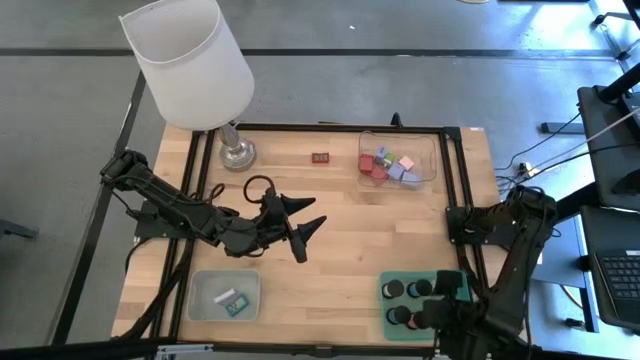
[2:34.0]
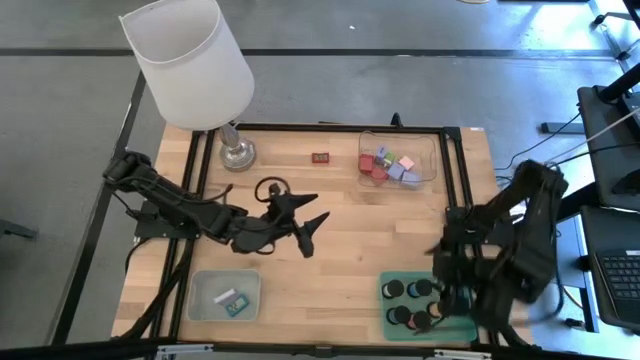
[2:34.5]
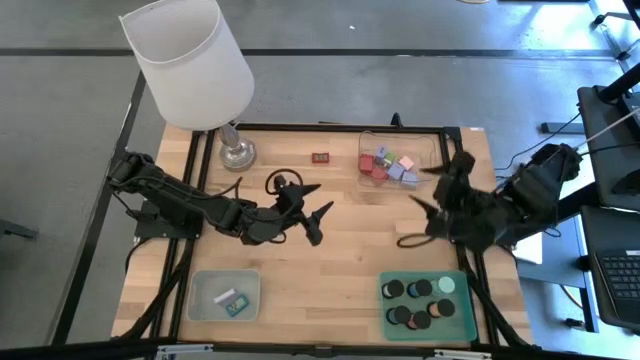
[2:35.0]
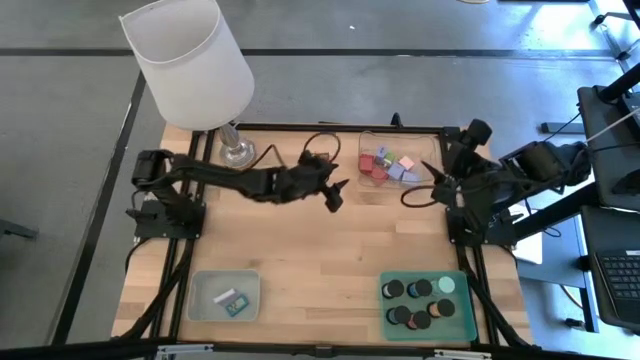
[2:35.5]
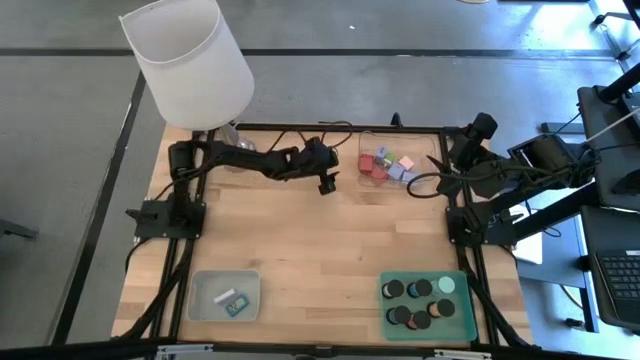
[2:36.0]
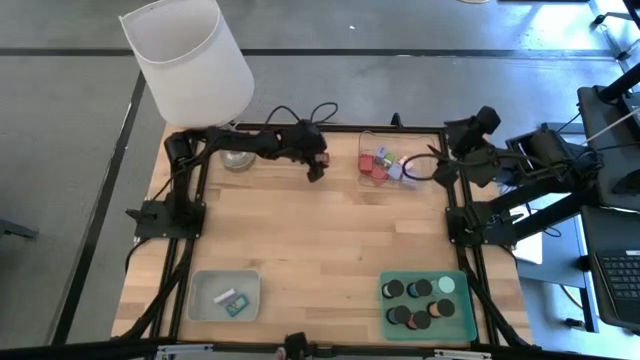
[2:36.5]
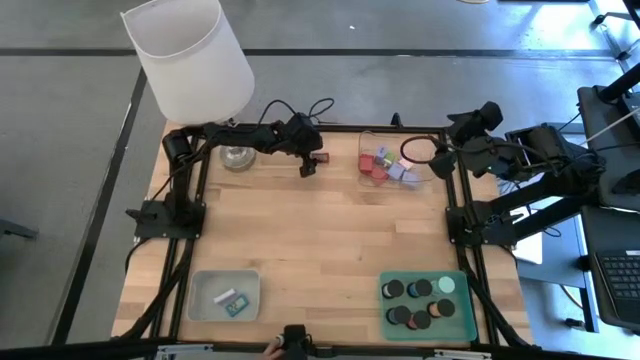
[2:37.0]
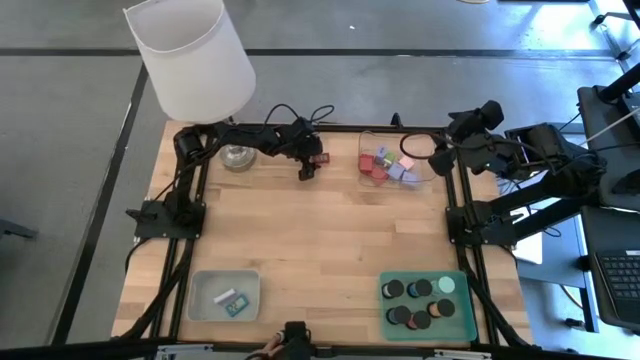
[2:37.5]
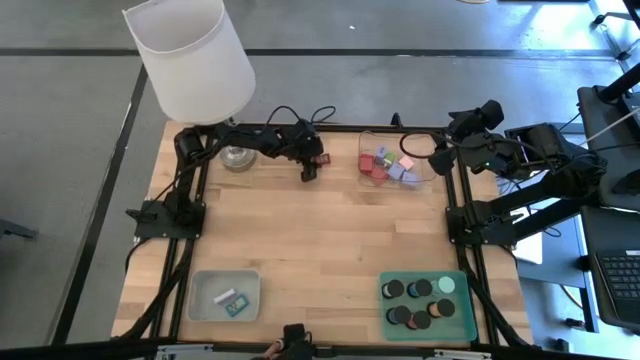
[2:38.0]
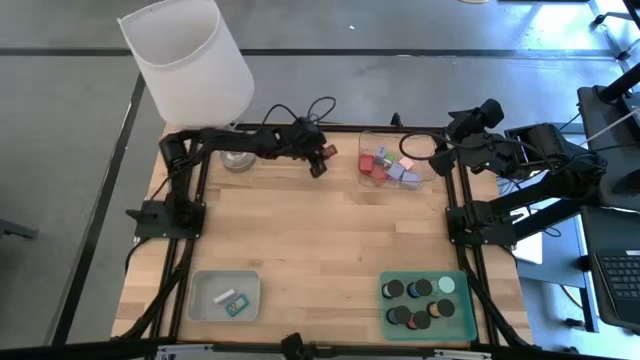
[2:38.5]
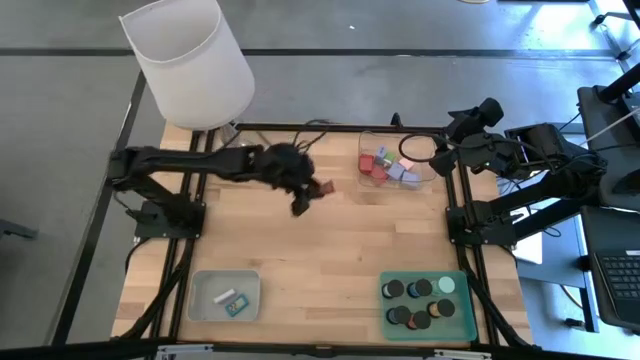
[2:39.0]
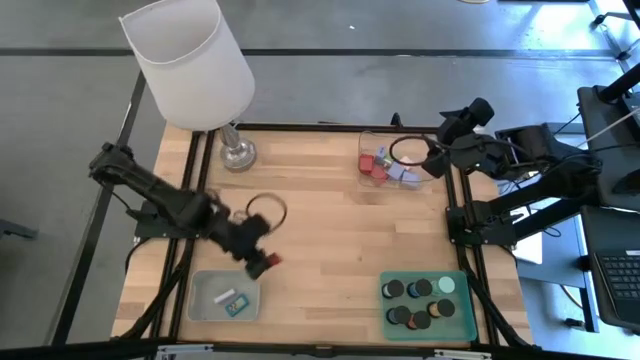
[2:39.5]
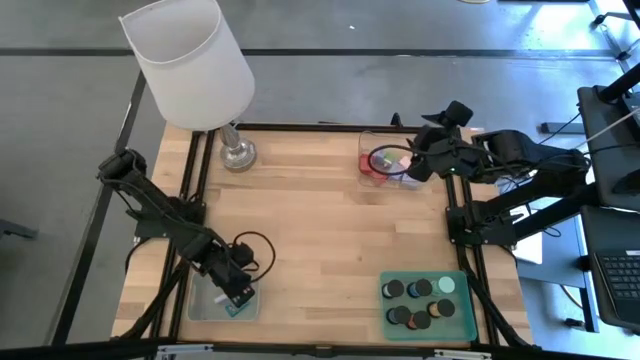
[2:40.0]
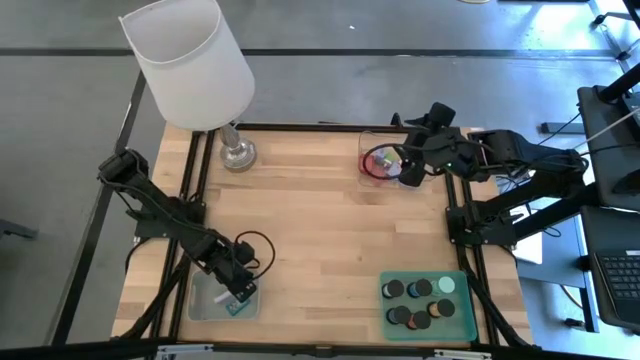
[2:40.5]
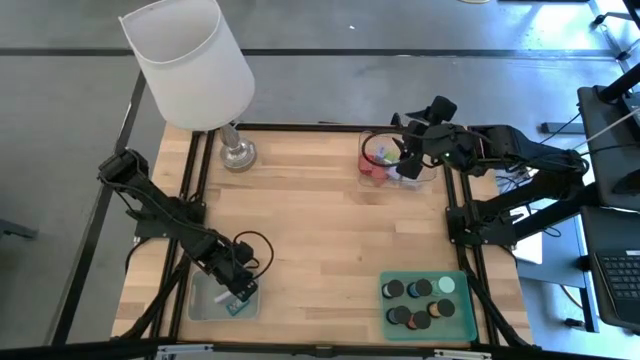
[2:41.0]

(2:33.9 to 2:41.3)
Task: Pick & Place Office items
Put the red timer into the gray bin

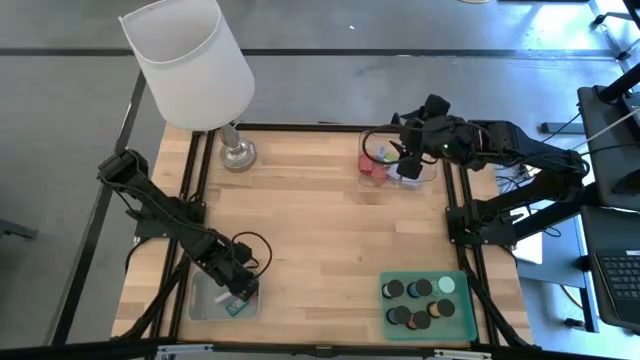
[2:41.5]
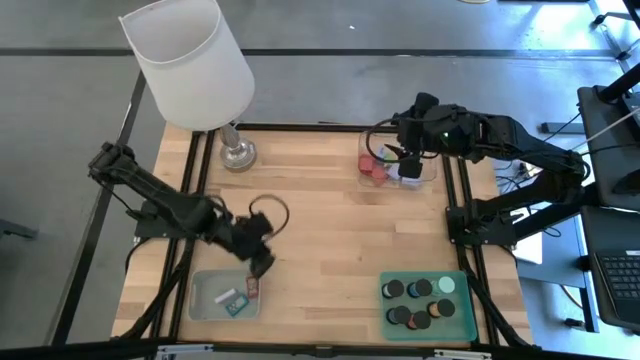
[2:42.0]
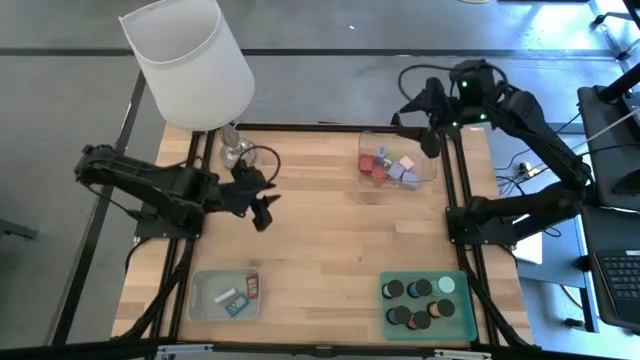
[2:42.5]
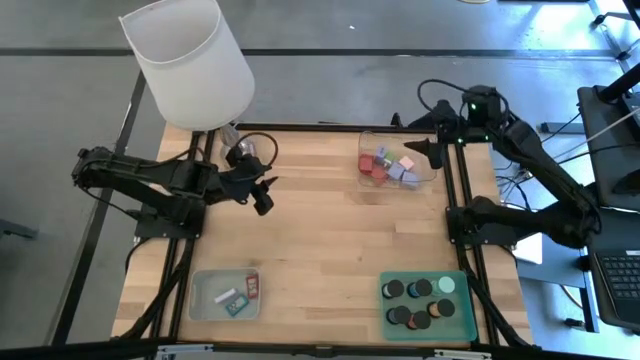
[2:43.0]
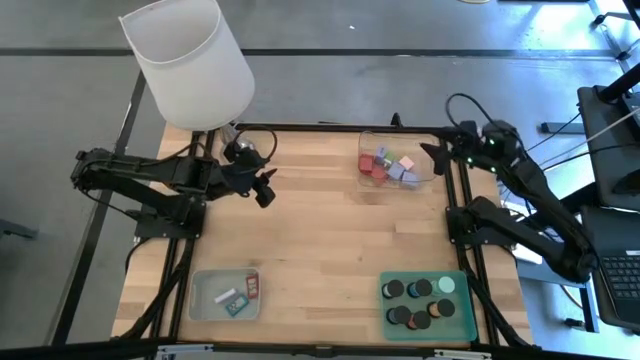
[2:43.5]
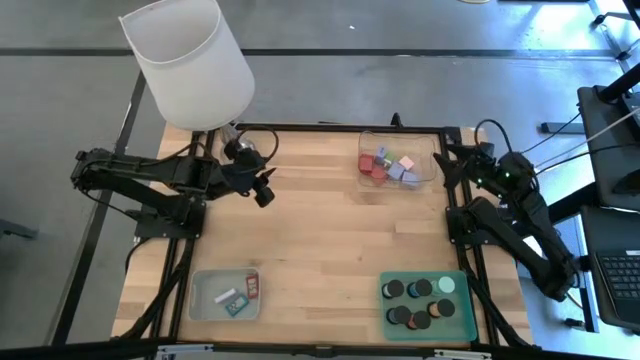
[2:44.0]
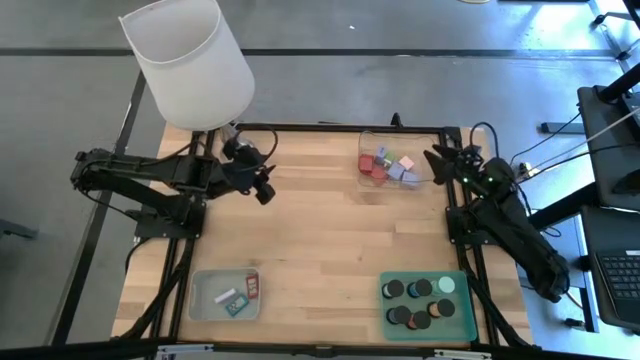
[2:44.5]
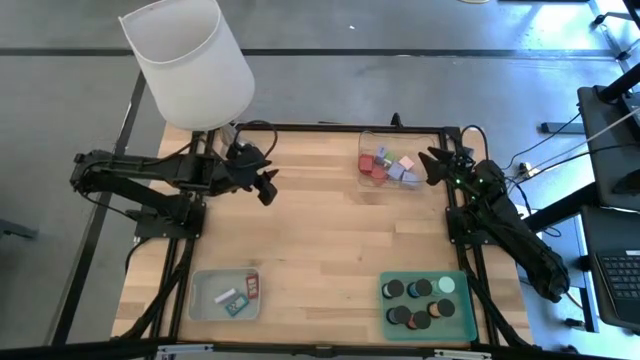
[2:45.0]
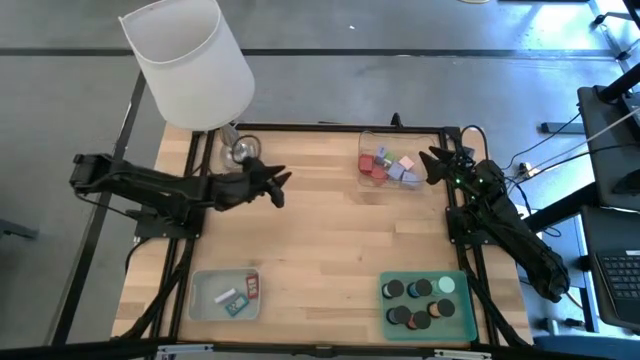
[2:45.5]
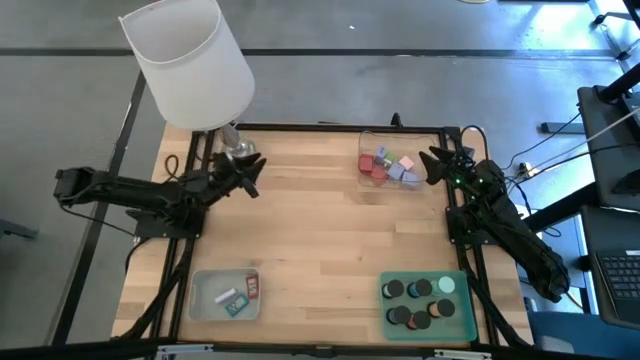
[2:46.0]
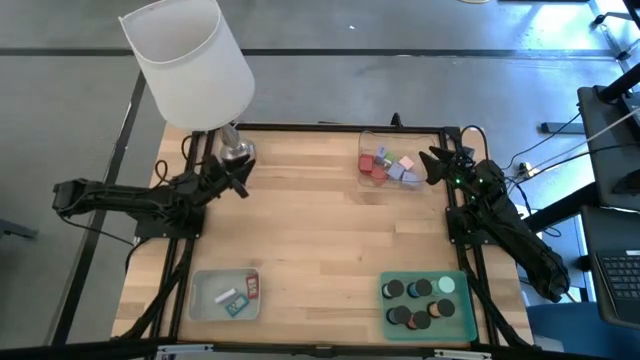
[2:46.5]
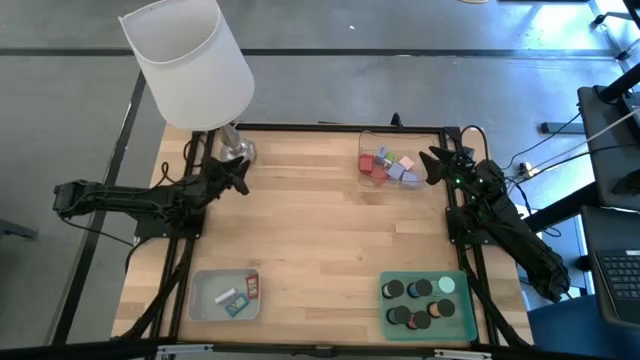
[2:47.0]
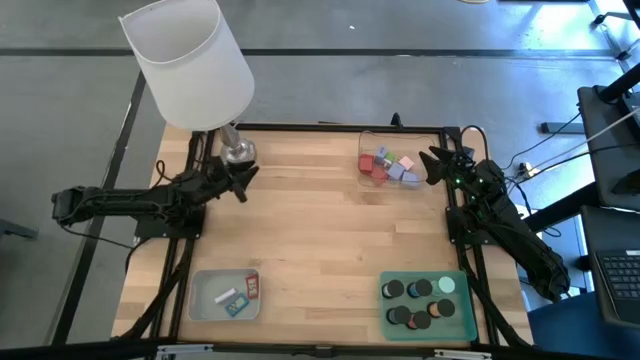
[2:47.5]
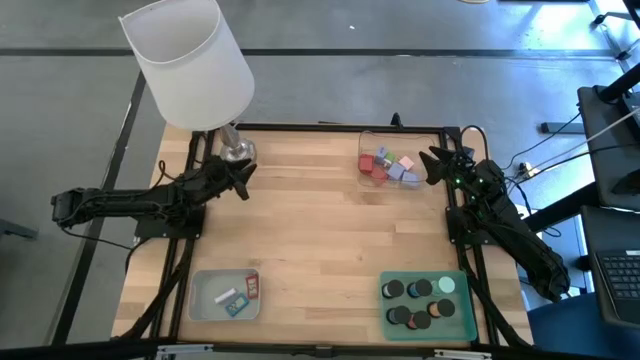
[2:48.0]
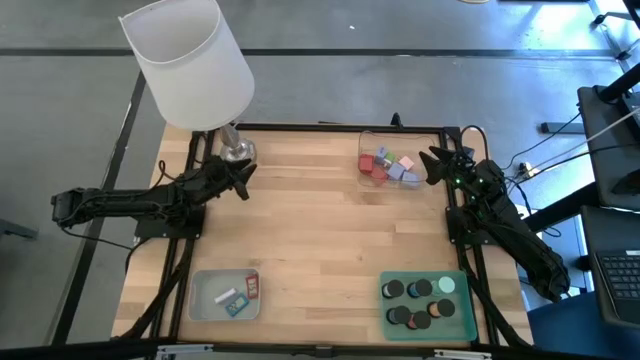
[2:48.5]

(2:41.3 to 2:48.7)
Return to Home Position

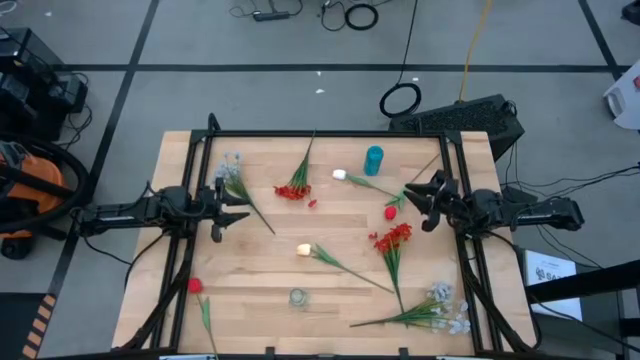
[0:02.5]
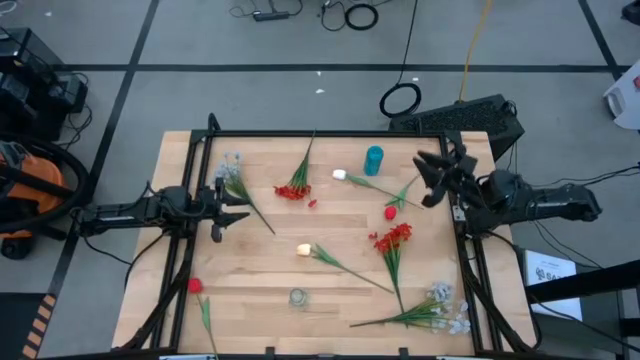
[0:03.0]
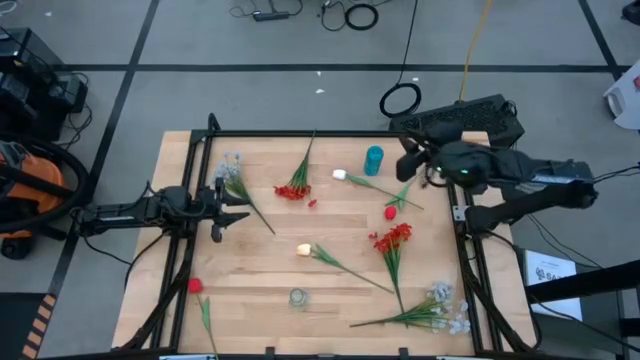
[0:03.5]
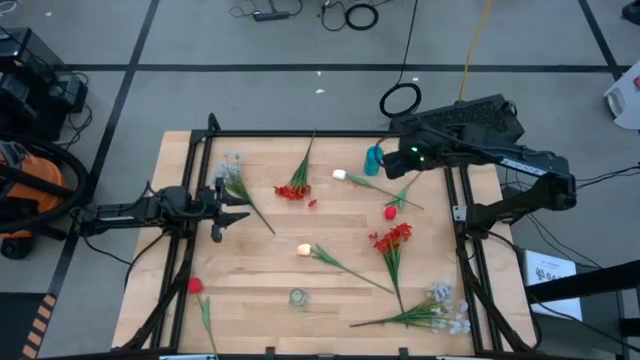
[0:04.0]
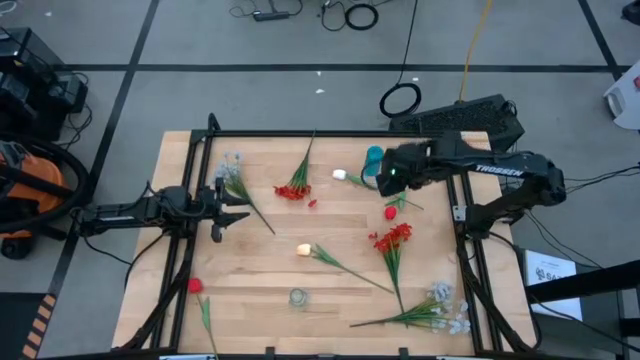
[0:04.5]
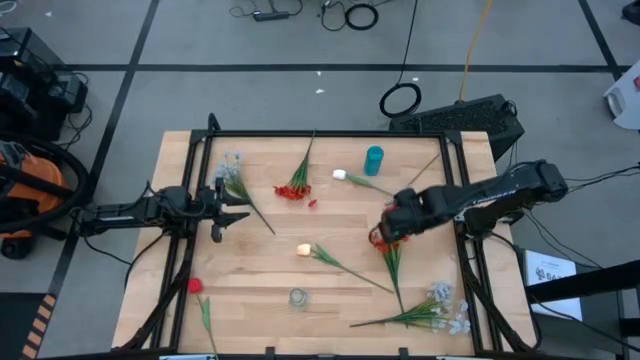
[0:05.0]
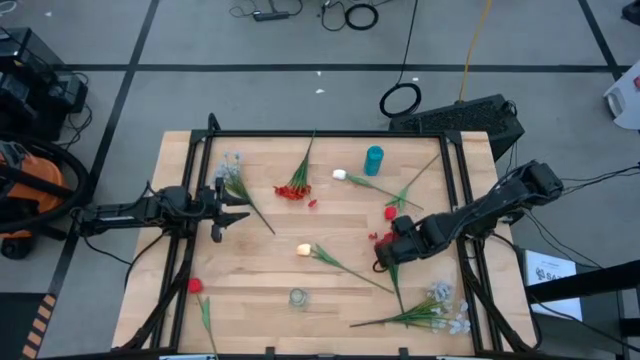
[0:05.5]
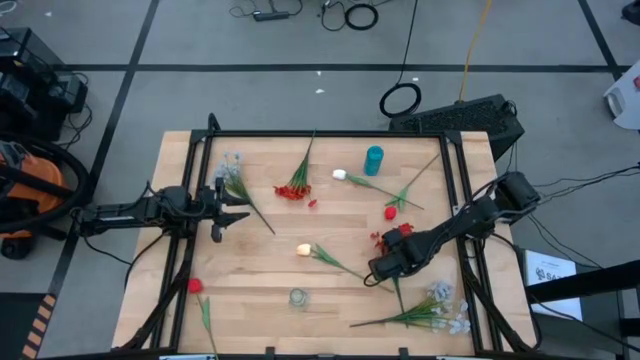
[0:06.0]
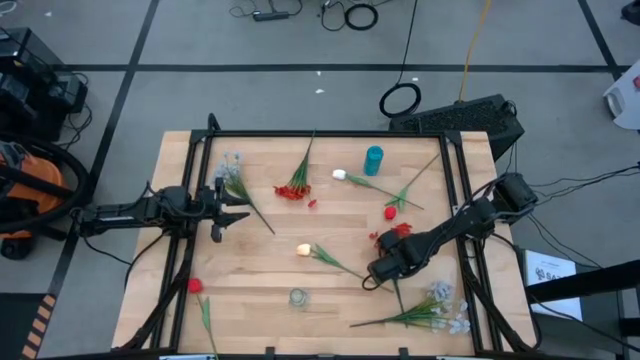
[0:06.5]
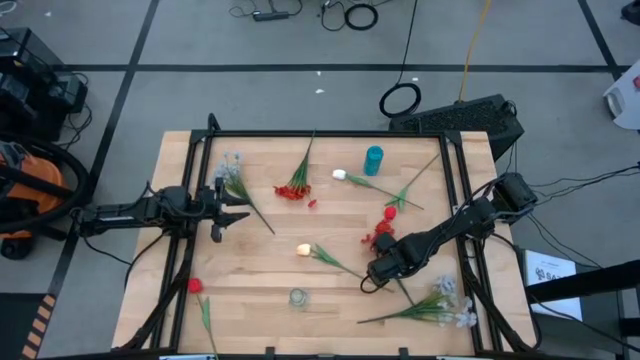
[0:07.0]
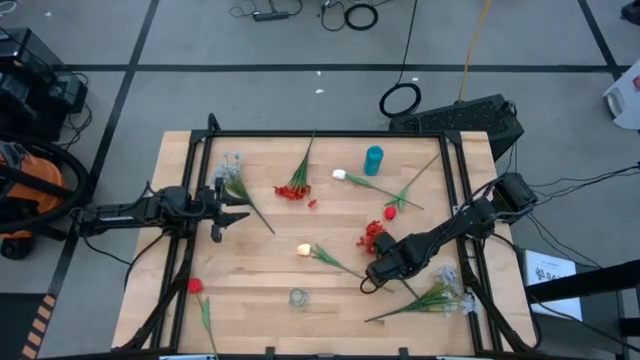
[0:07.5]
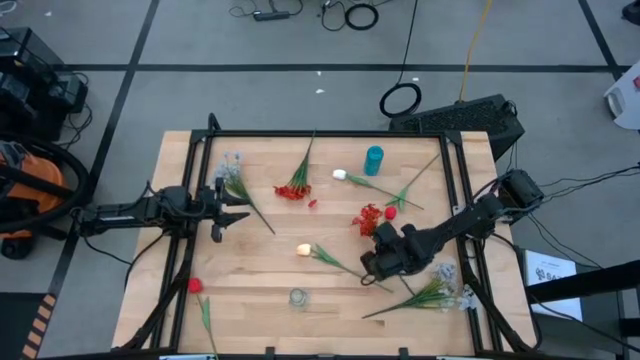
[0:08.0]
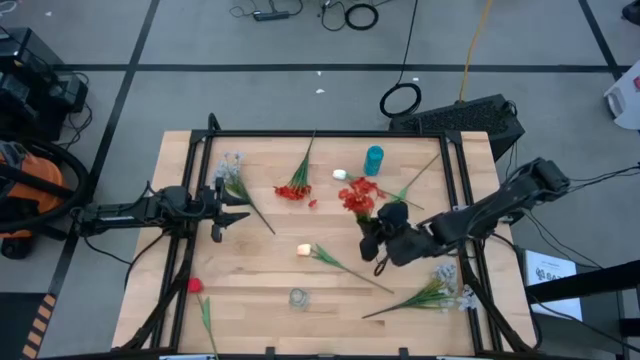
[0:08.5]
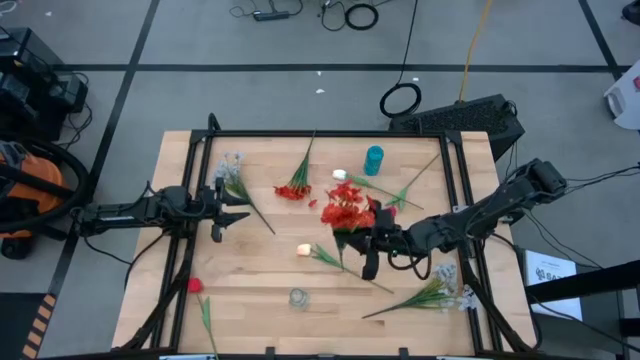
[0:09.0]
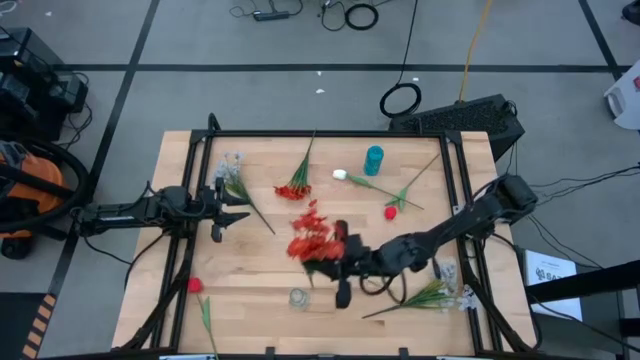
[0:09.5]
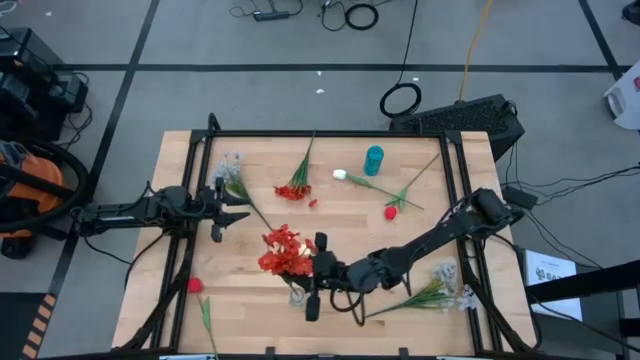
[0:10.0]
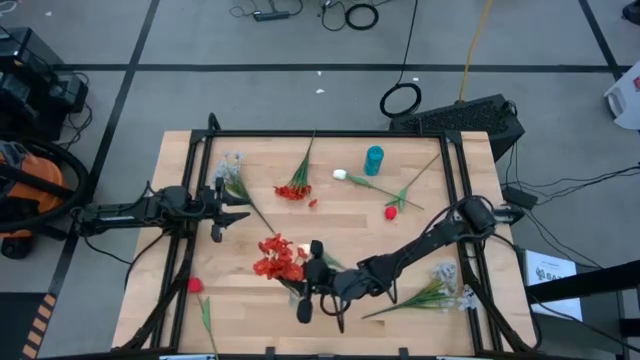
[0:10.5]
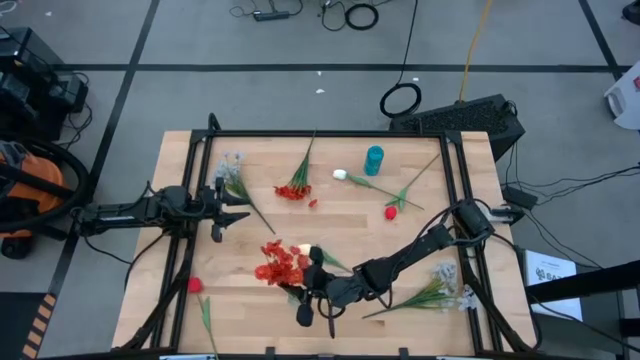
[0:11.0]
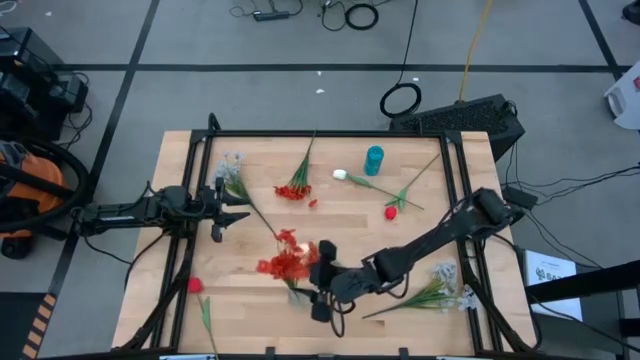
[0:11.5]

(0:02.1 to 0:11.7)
Task: Sort flowers into vase by color
Put the bottom orange flowers into the transparent vase
